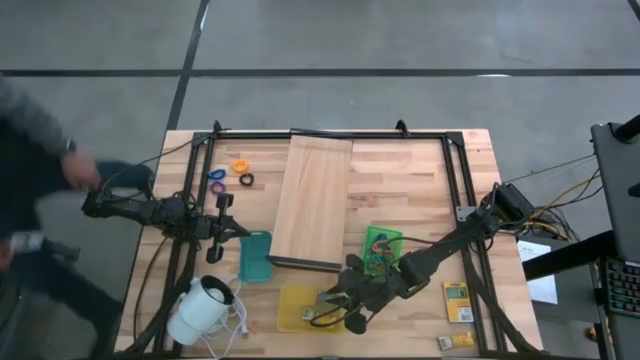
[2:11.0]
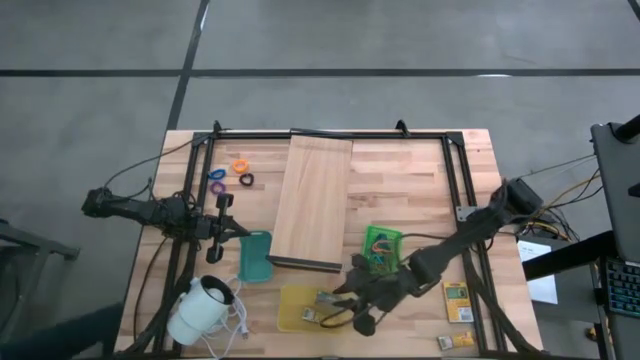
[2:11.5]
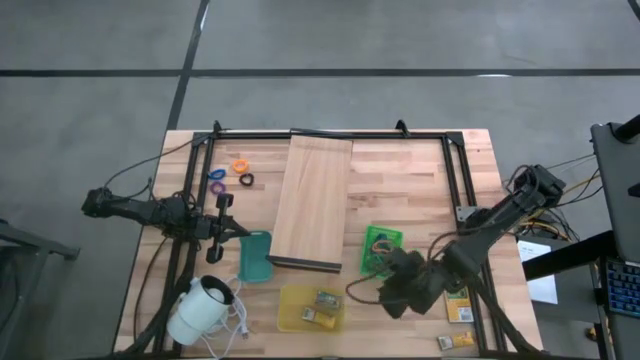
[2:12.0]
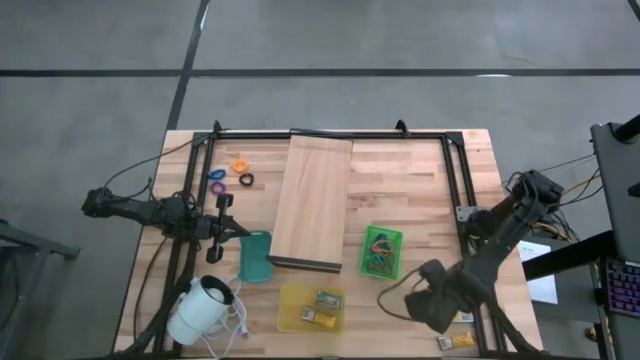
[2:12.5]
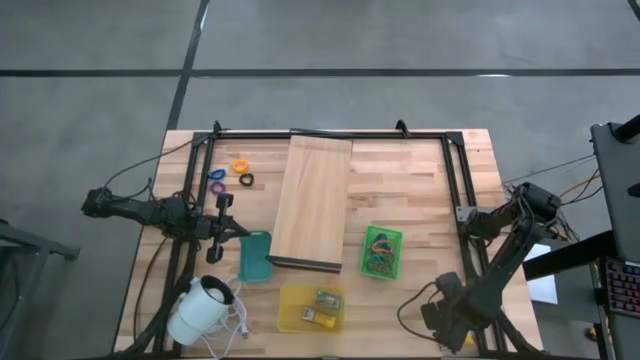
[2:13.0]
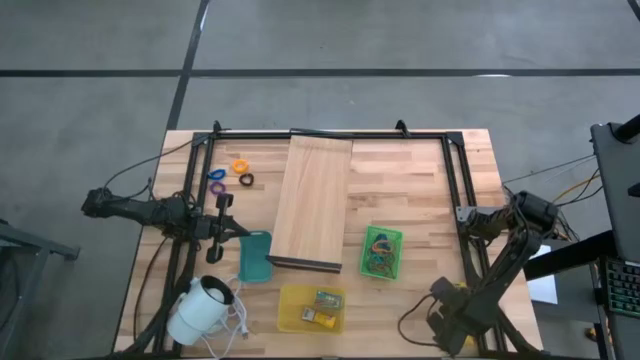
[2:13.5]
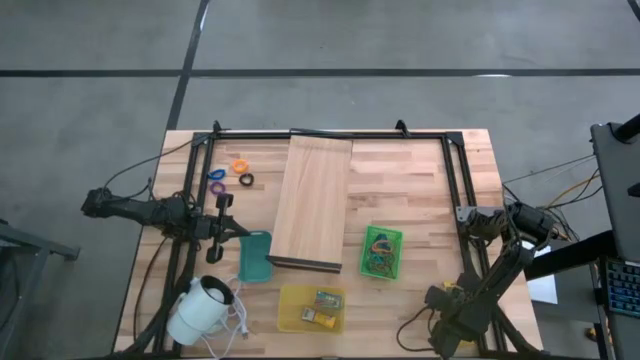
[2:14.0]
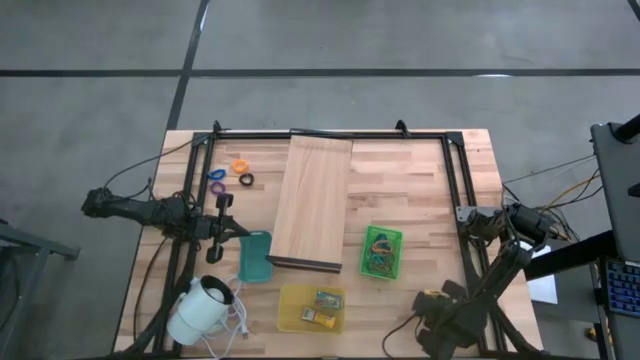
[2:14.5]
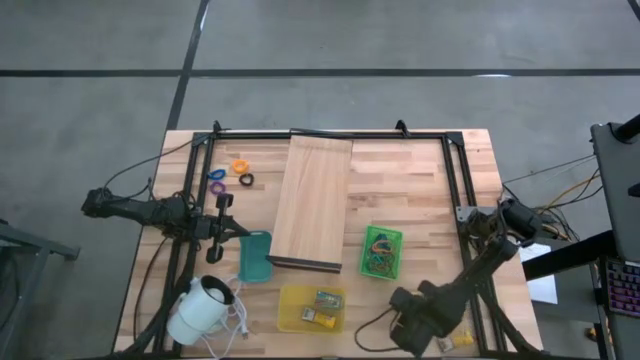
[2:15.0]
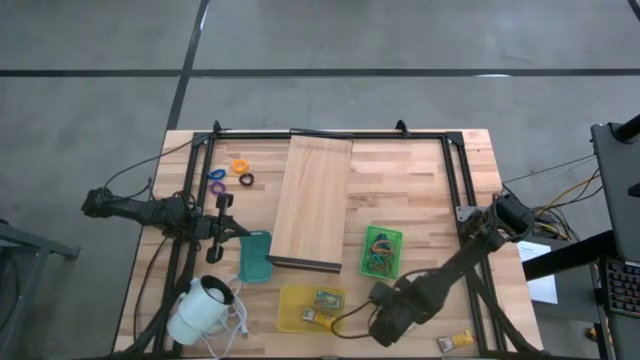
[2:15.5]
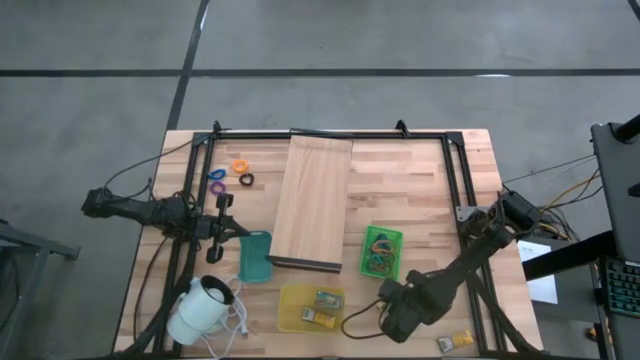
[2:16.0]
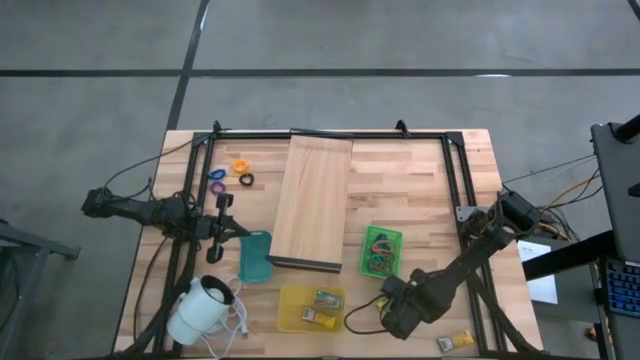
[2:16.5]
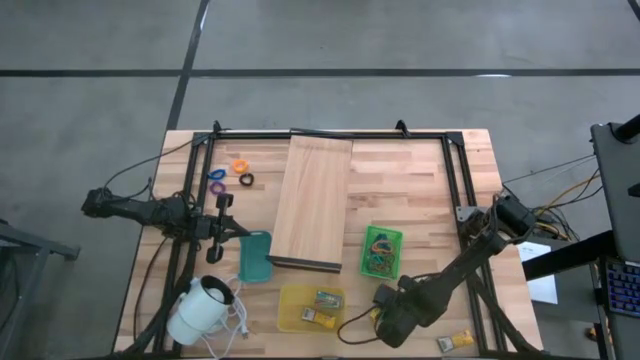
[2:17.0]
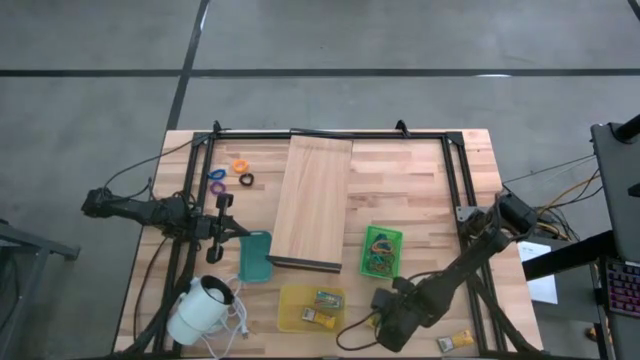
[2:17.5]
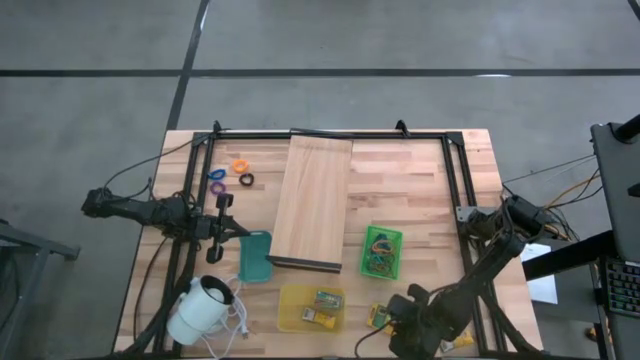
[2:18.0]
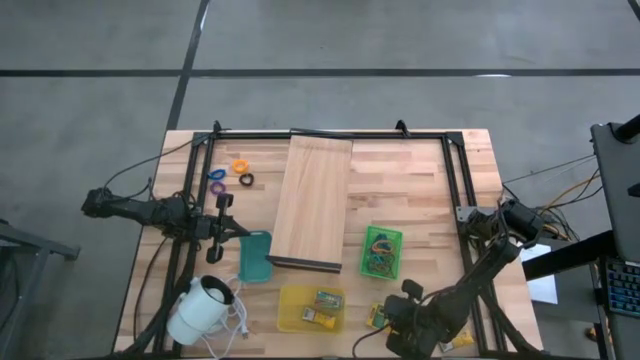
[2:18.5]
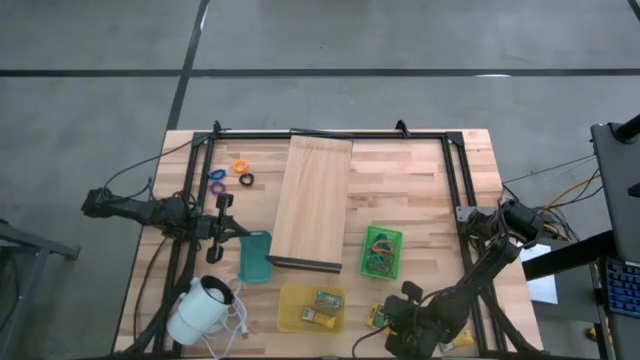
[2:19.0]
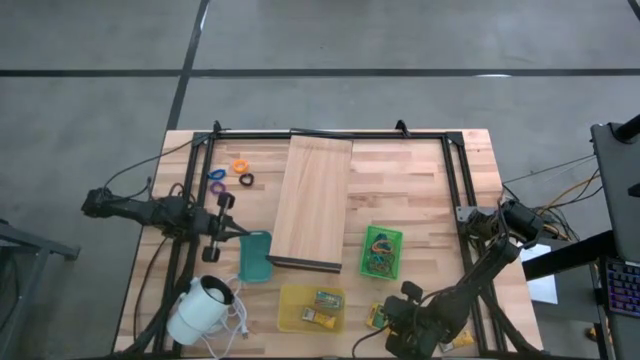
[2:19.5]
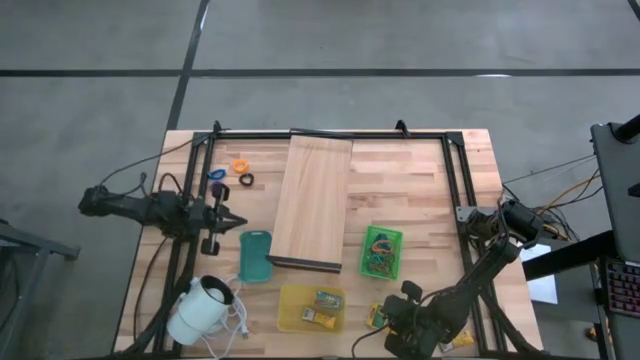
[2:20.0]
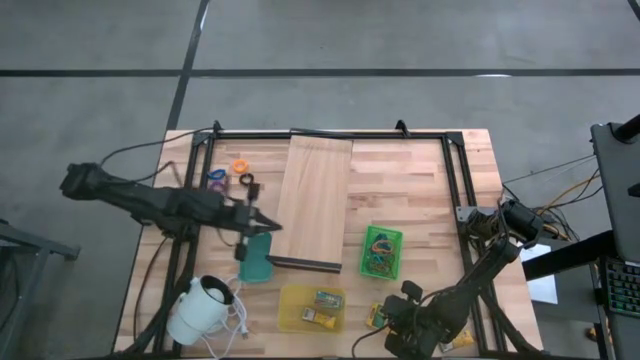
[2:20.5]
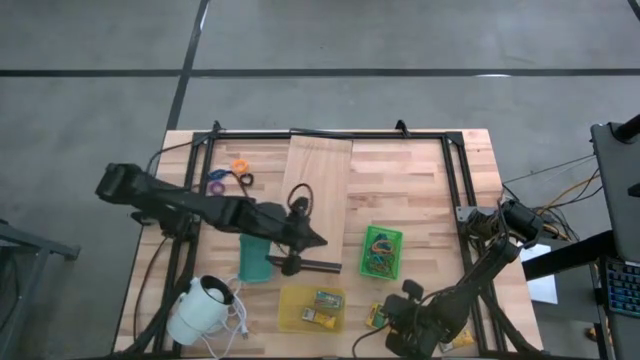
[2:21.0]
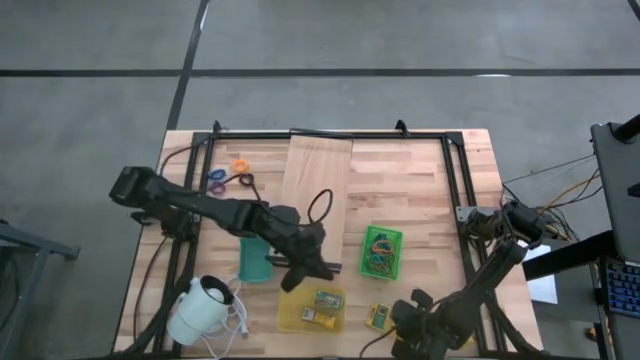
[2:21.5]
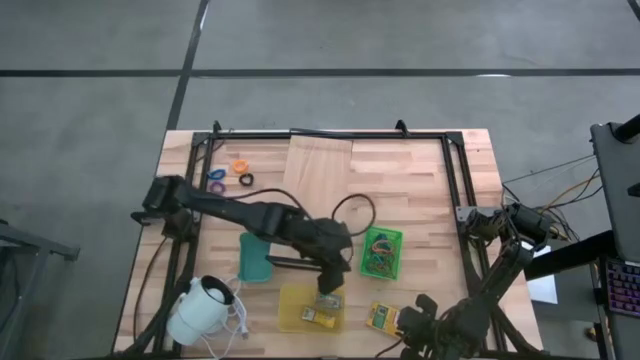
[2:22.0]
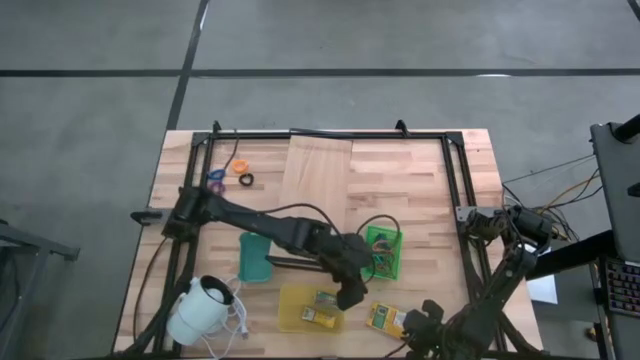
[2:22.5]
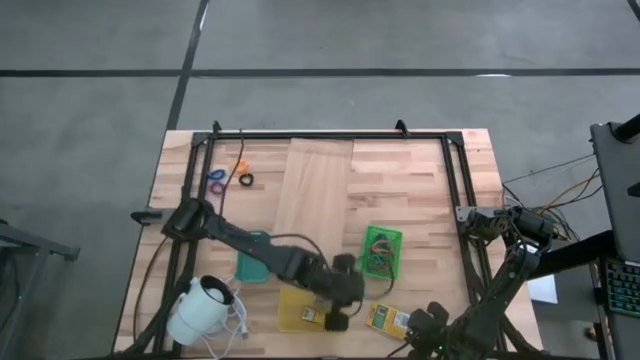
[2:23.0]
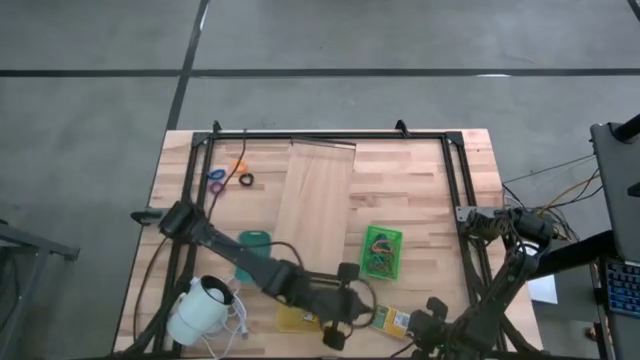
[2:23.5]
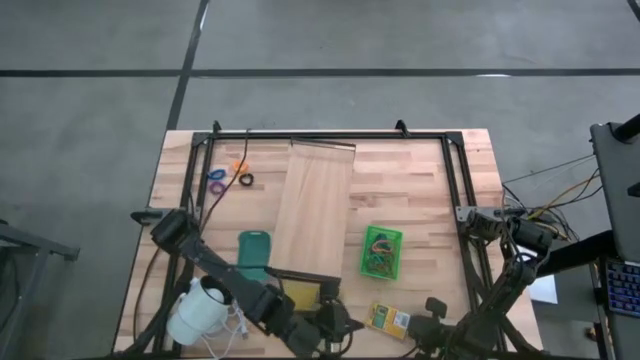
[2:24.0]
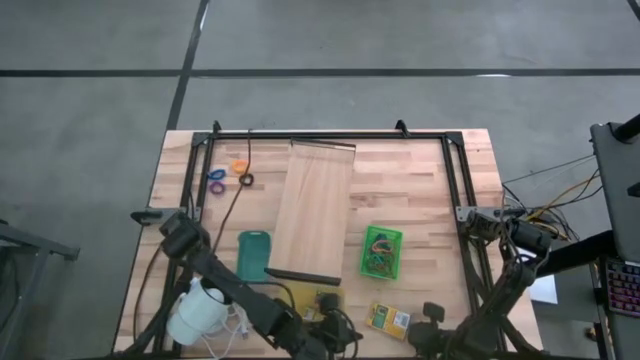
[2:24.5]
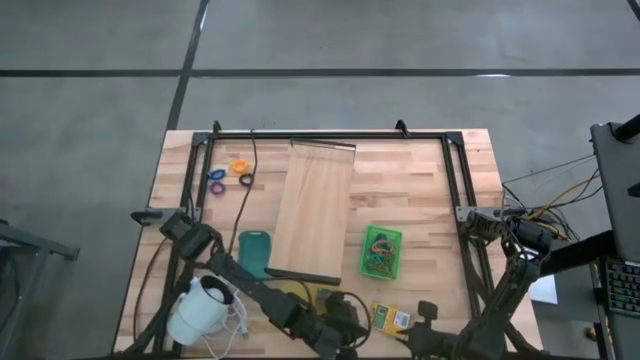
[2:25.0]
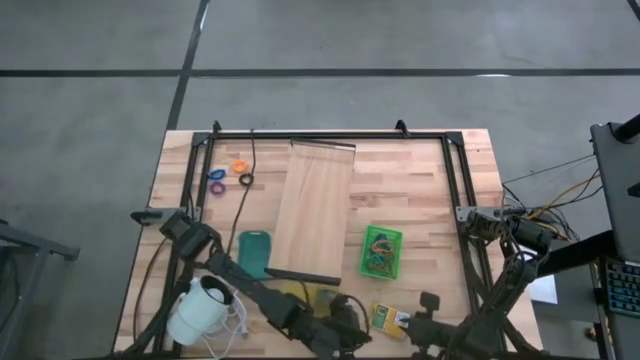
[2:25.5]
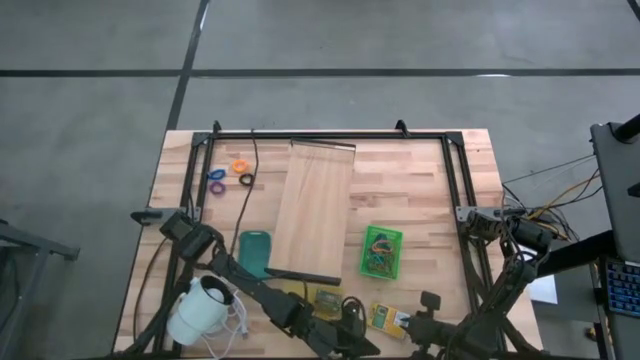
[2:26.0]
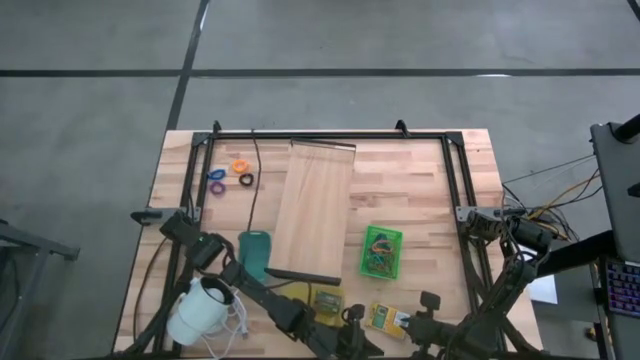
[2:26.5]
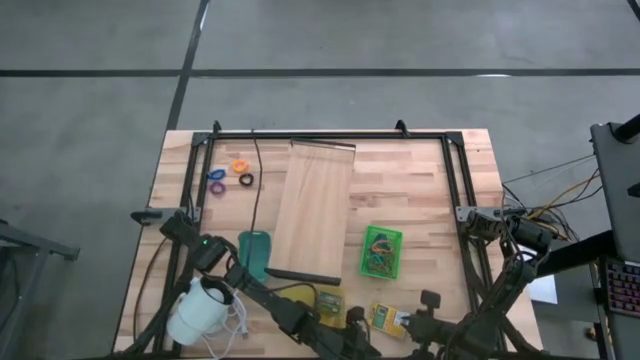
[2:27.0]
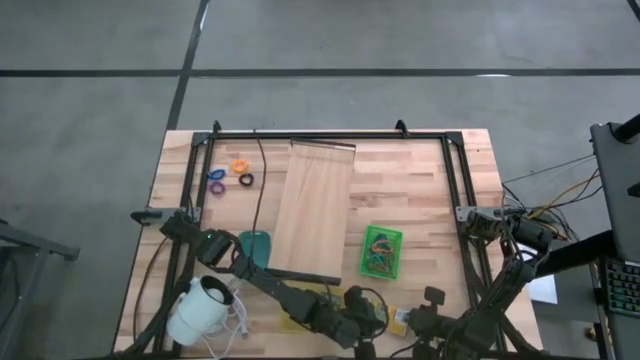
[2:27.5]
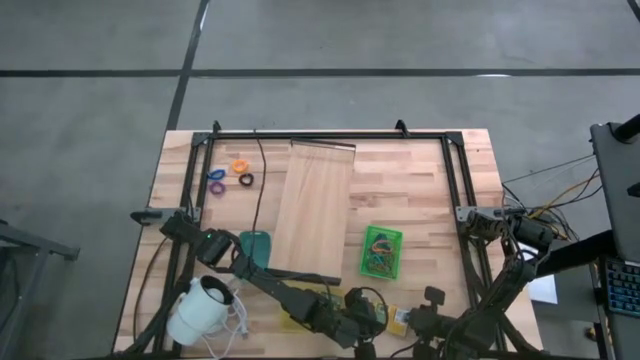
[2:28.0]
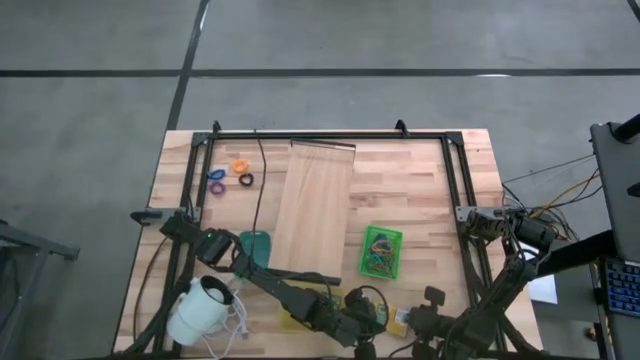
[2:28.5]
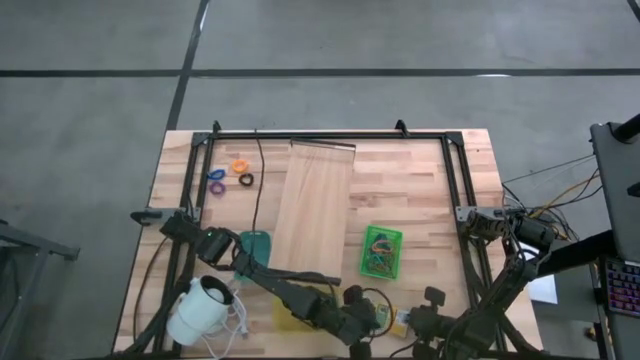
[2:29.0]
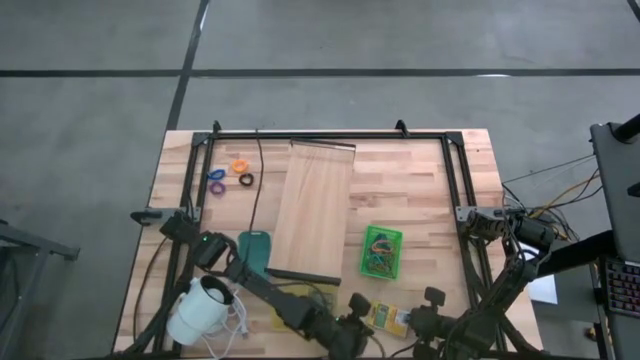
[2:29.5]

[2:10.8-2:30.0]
Task: Pick & Place Office Desk Supplies
Put the large yellow crayon box into the yellow bin

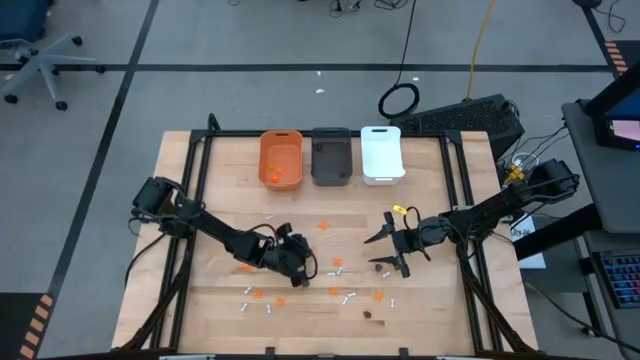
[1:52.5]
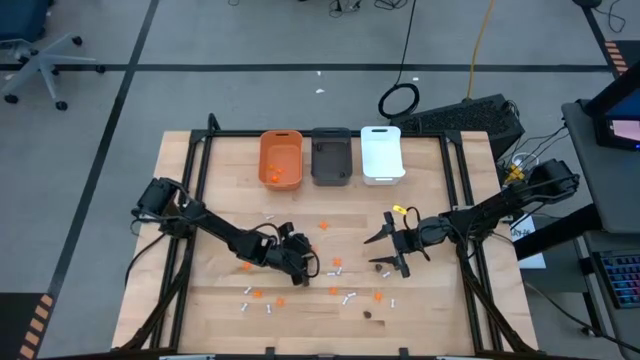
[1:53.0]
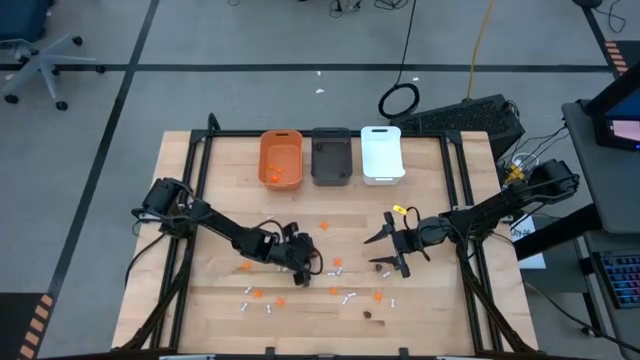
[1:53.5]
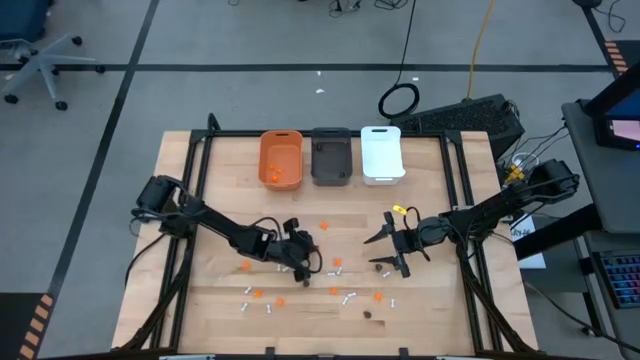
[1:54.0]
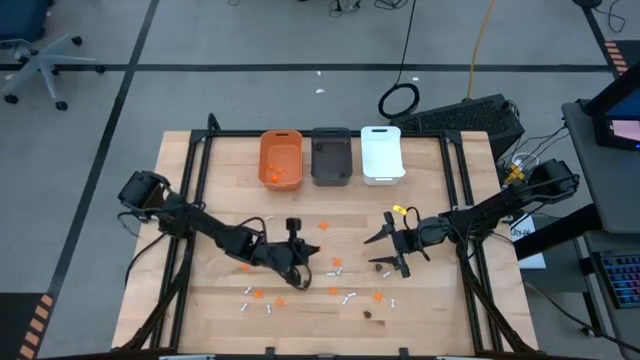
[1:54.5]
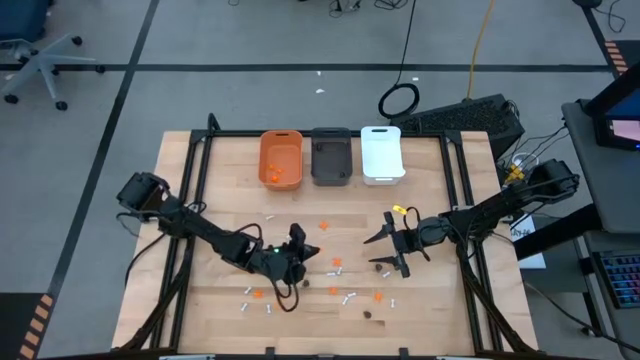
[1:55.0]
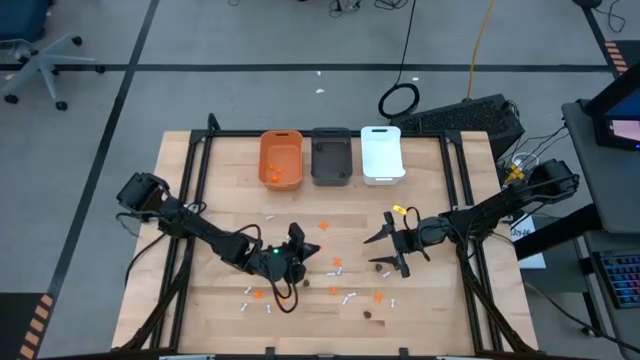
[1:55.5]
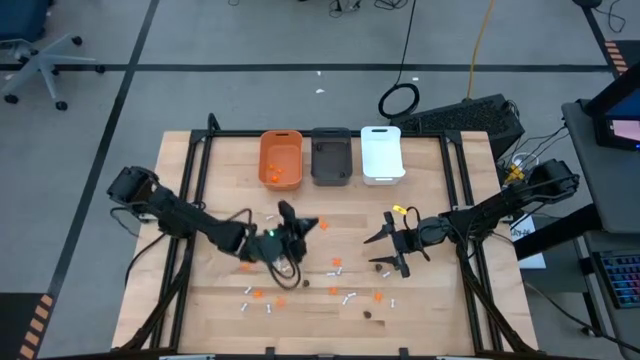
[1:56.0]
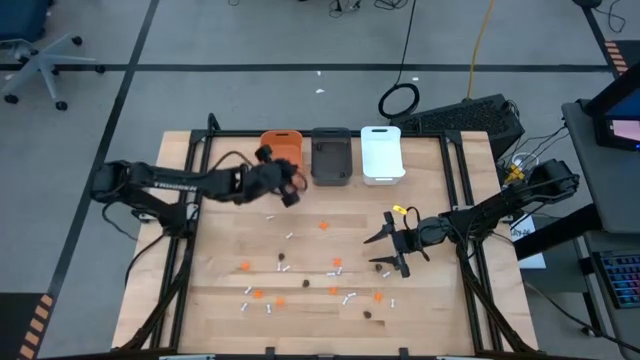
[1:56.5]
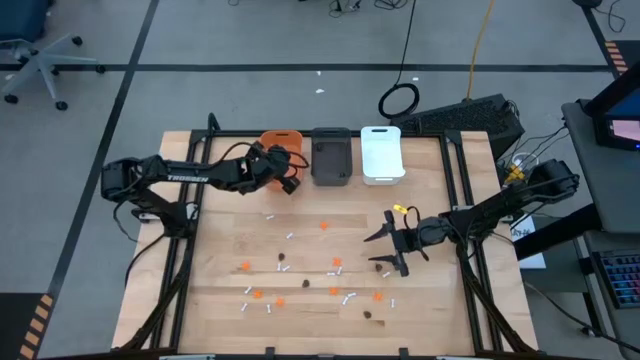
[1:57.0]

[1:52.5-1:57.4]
Task: Sort Halloween decoration
Put the orange spider toy into the orange bin
